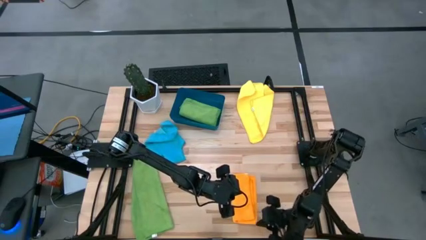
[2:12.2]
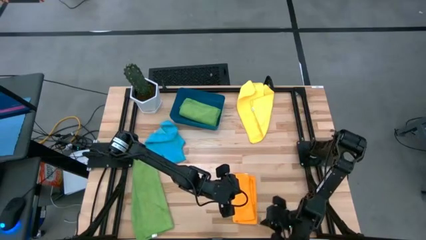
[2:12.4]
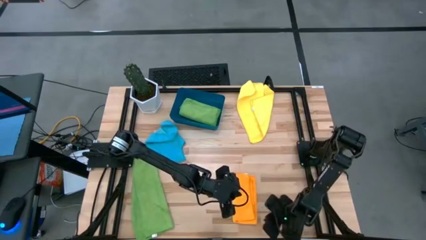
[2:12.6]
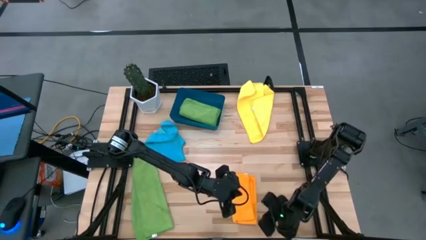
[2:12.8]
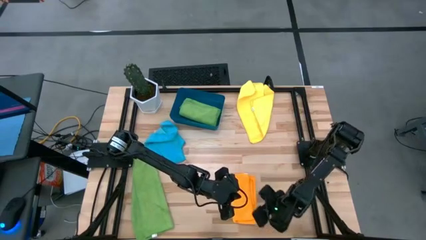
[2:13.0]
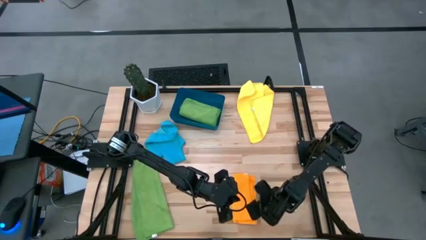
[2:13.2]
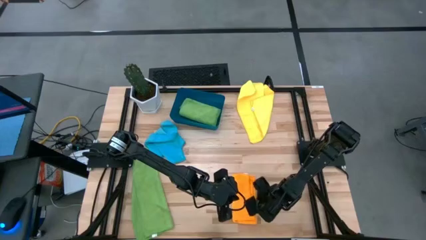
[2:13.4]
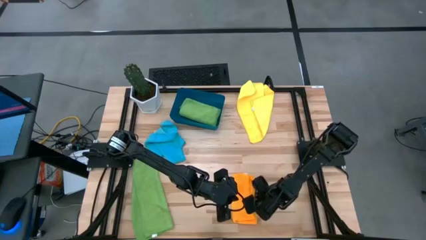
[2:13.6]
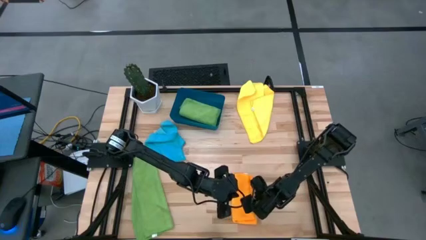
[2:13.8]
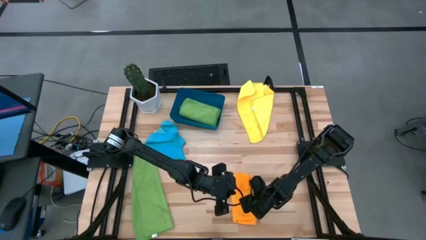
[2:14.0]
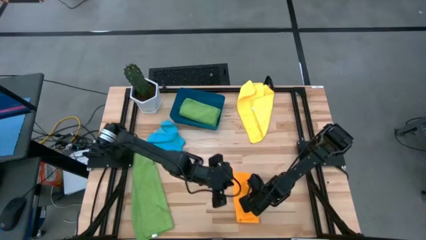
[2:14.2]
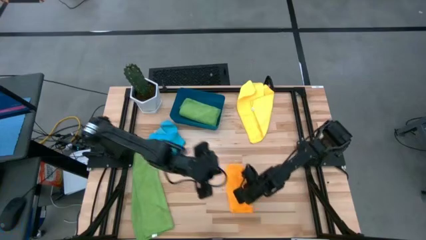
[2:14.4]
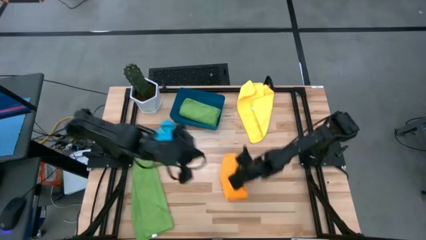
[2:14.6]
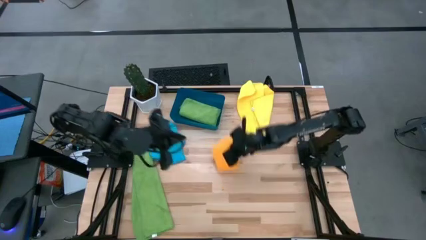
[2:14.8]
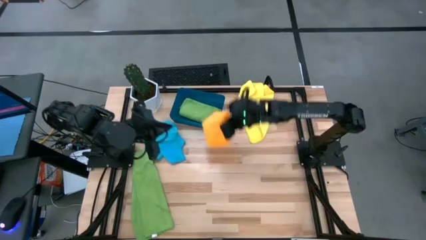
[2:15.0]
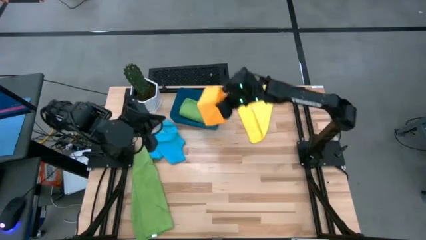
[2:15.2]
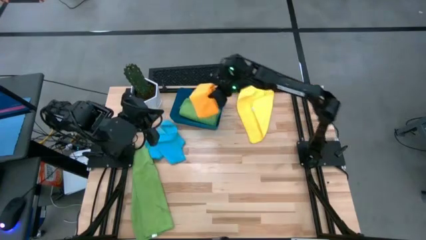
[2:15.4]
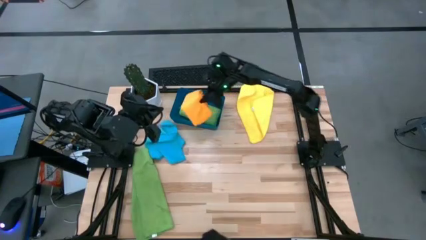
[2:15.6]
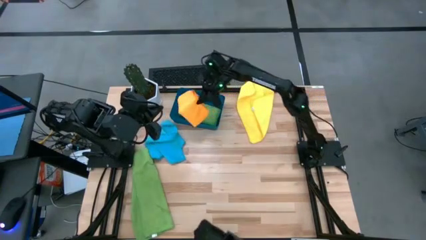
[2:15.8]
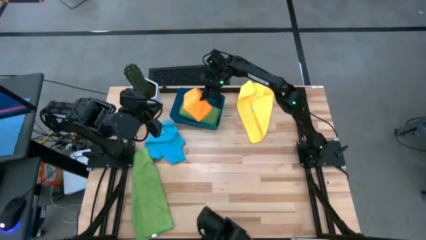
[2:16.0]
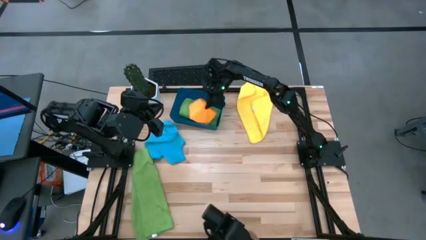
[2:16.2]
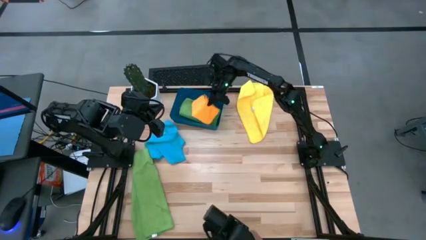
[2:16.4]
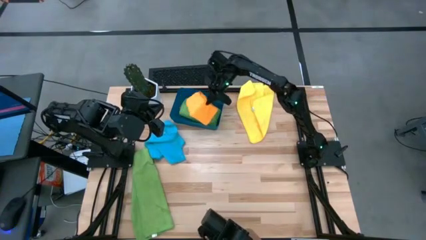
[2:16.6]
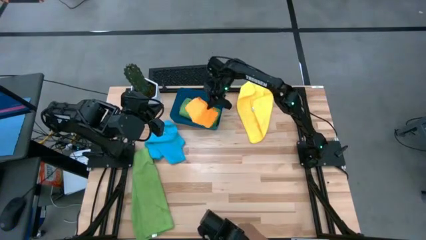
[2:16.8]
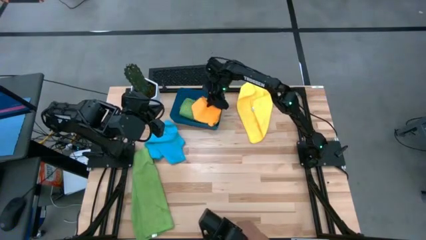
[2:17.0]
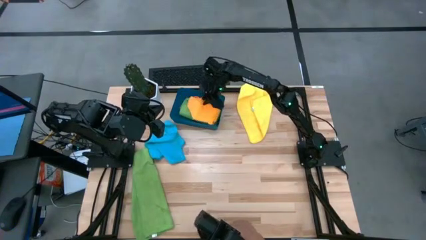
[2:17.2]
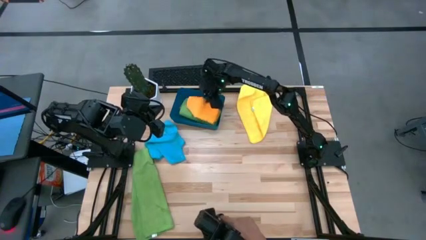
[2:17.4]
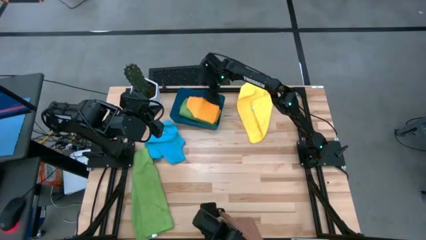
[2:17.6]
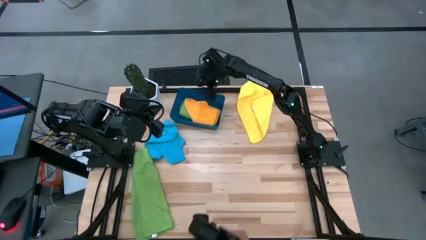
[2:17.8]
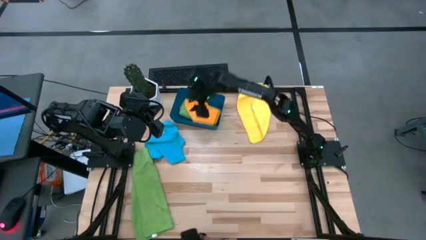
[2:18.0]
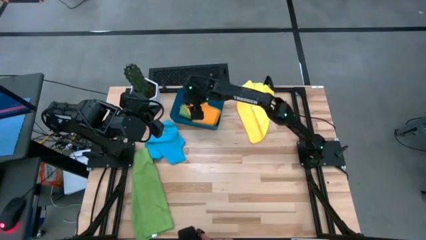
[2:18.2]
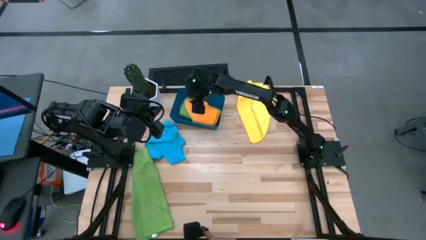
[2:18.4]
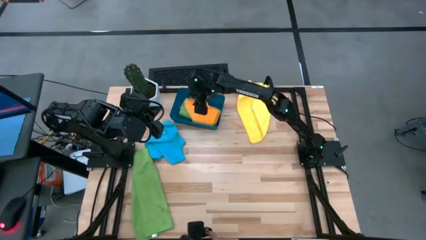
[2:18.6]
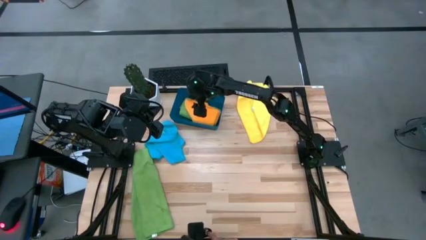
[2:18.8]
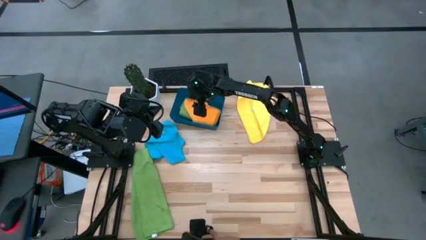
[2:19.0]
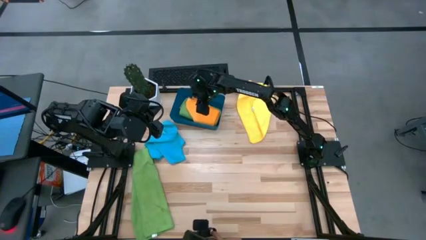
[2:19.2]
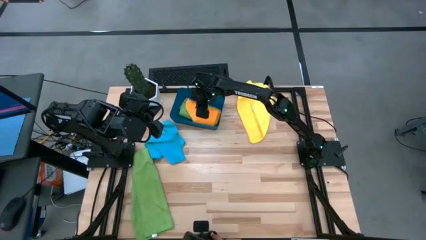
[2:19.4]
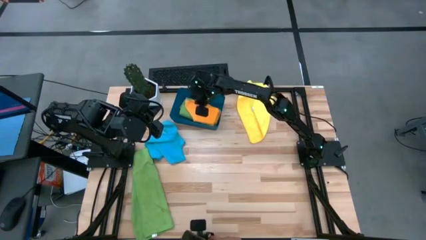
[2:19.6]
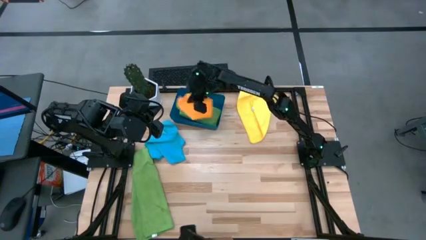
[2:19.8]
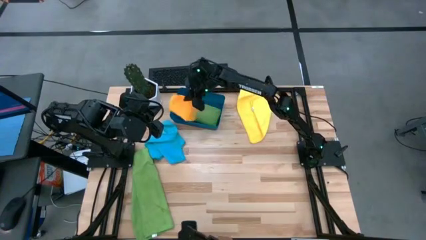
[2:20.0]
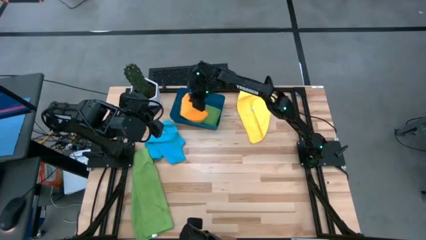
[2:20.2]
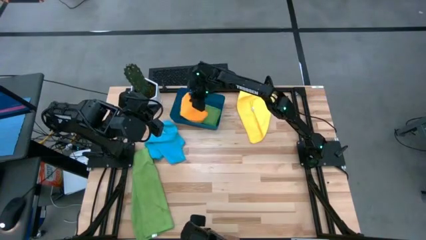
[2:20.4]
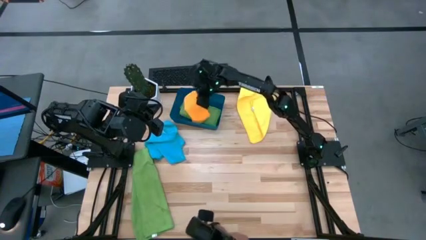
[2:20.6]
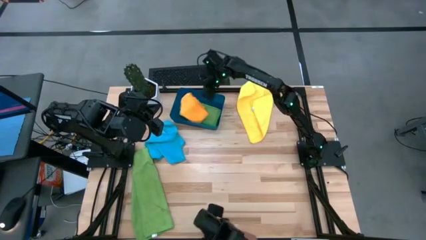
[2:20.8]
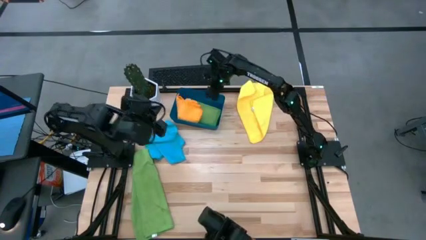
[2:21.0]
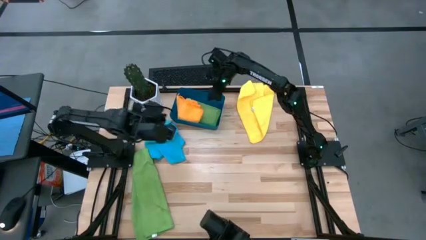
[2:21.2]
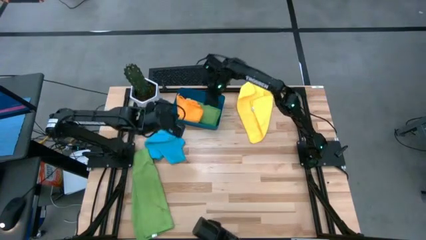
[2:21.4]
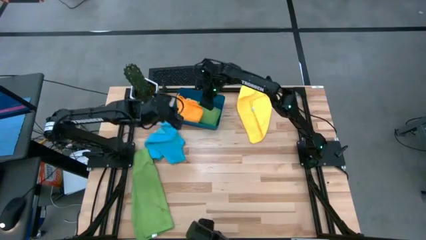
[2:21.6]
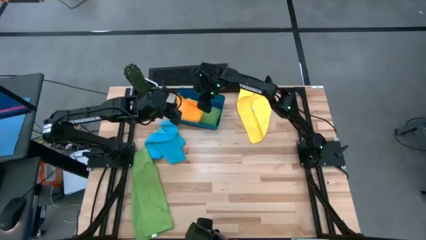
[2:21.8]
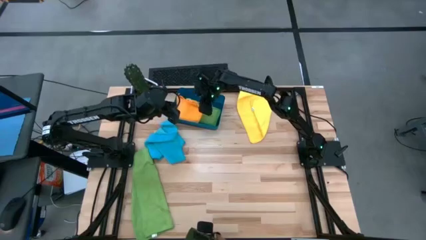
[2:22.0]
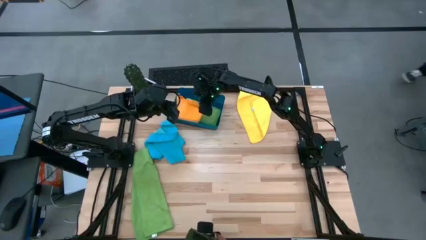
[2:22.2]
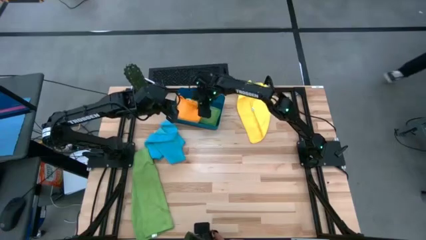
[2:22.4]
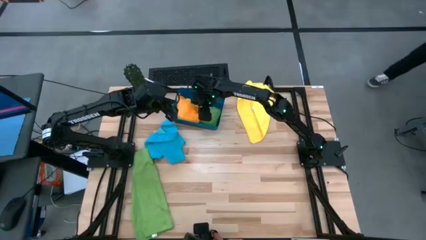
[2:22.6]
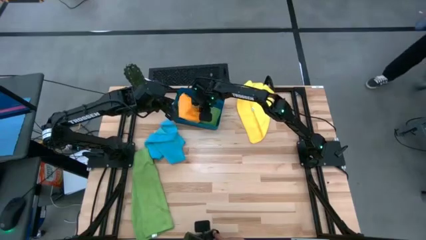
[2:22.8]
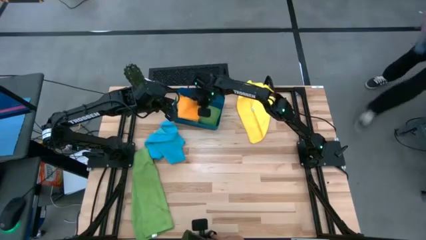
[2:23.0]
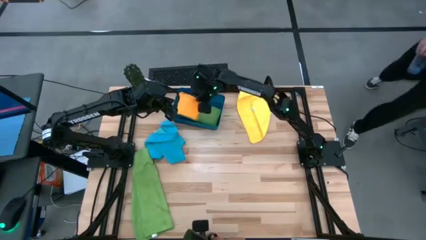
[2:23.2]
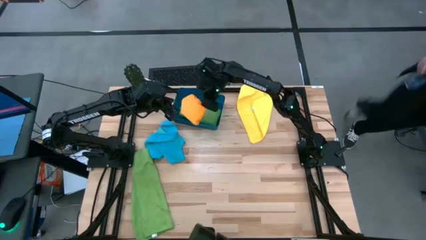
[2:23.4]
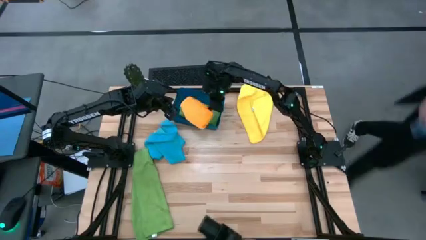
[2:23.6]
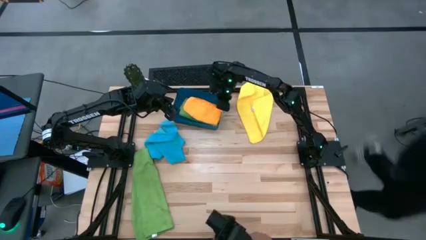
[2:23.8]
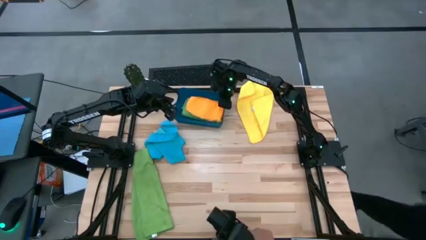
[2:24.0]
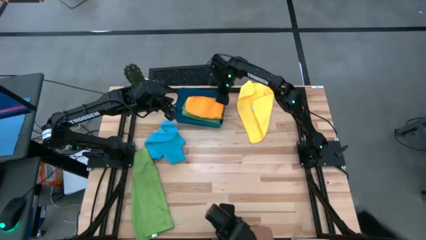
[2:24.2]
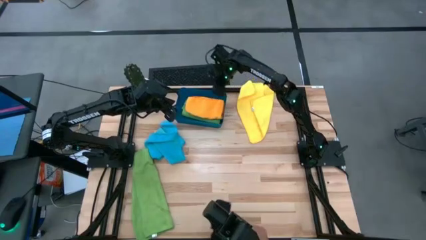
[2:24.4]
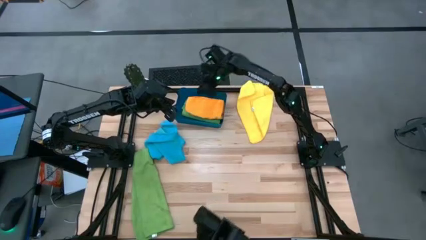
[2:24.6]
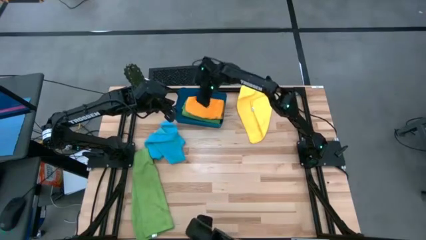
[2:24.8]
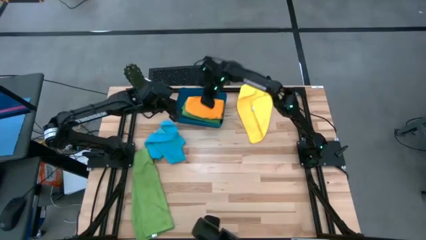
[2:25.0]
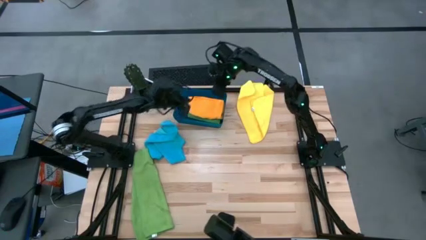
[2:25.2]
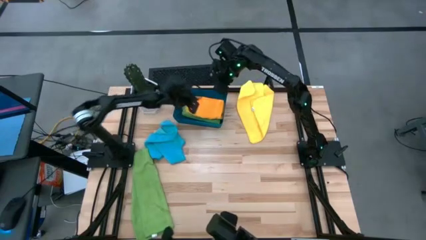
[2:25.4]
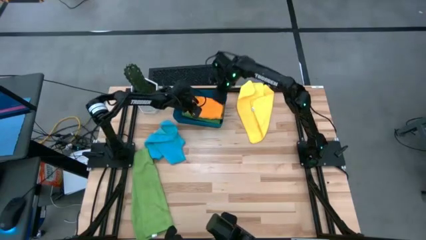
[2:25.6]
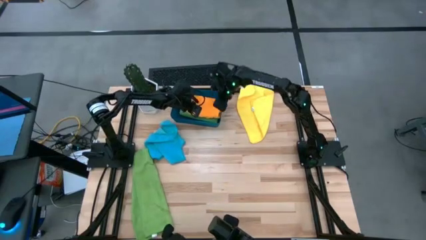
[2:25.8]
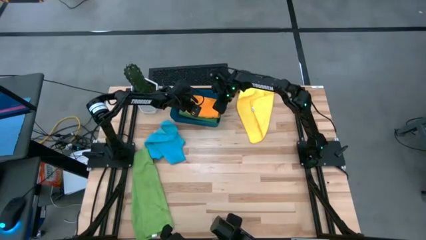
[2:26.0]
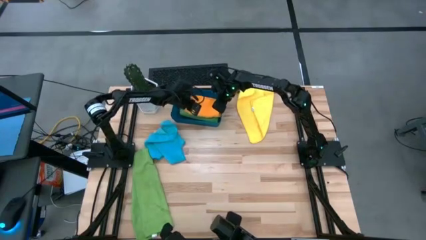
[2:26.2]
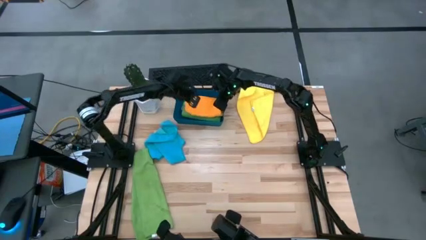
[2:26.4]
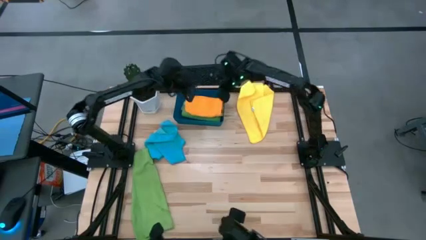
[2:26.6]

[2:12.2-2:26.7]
Task: Fold microfiber towels
Put the orange towel into the blue bin
